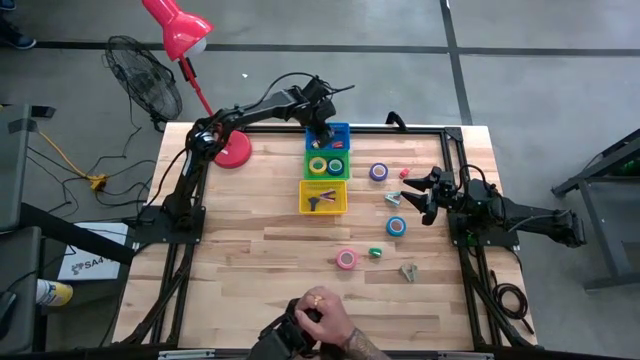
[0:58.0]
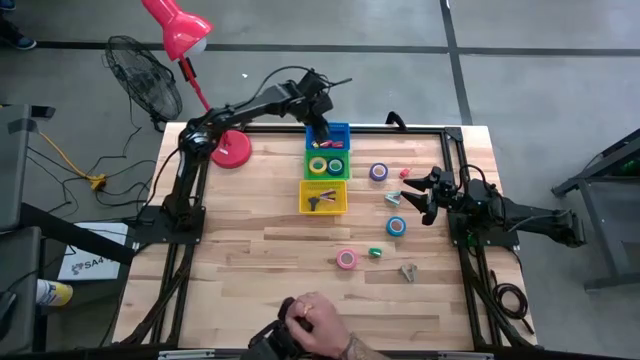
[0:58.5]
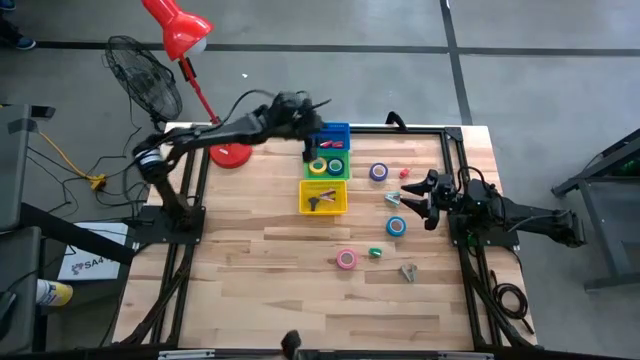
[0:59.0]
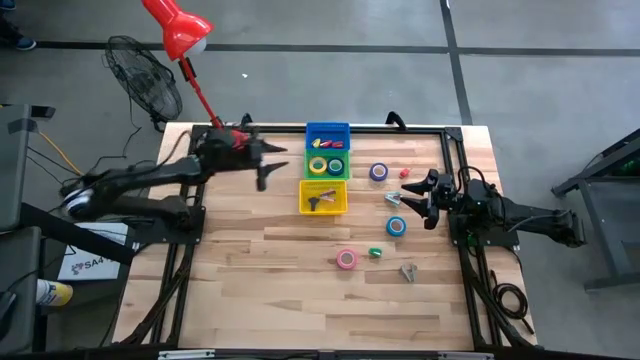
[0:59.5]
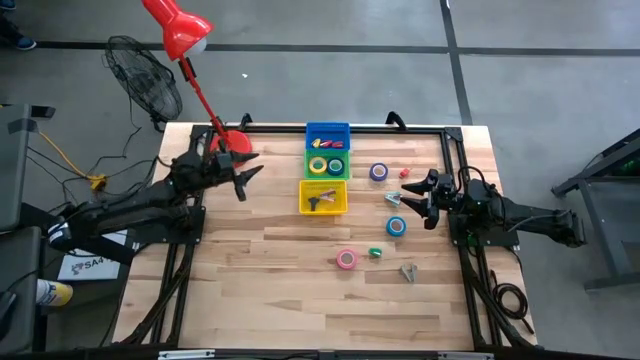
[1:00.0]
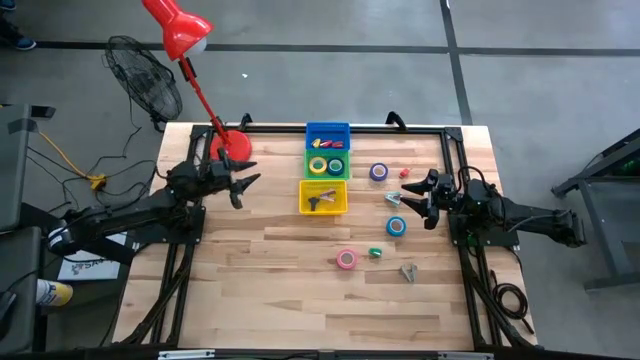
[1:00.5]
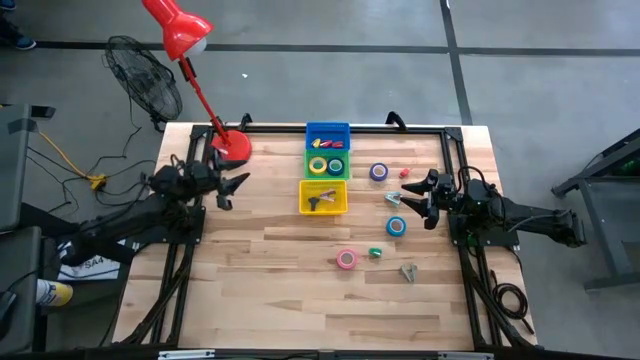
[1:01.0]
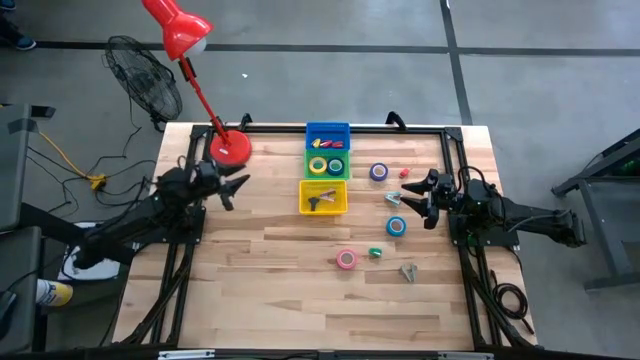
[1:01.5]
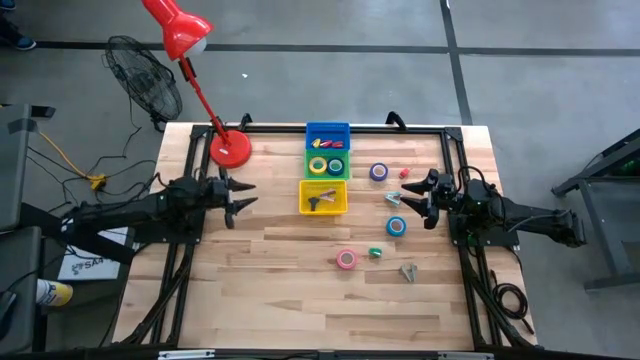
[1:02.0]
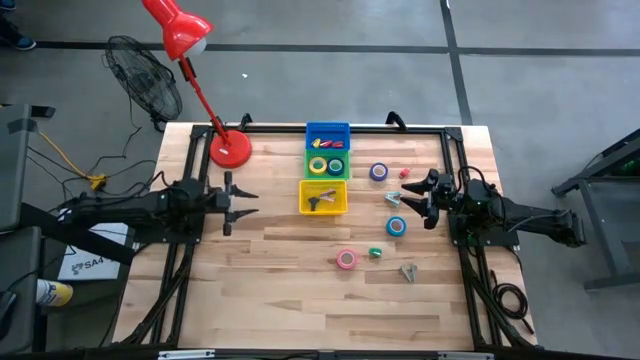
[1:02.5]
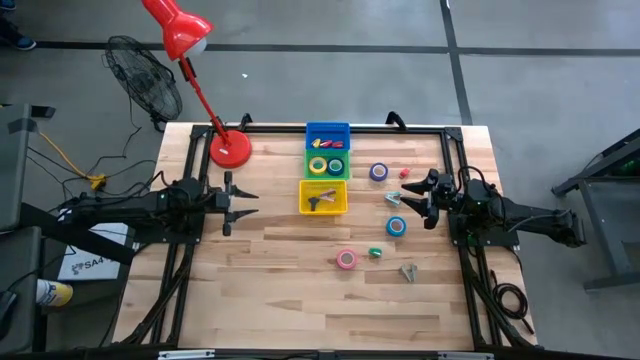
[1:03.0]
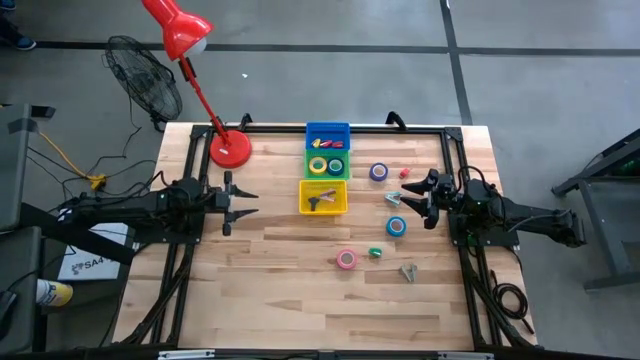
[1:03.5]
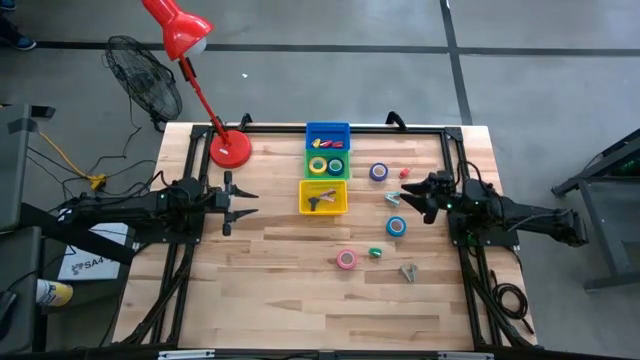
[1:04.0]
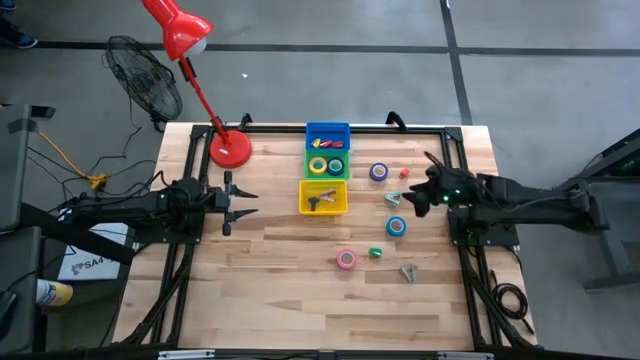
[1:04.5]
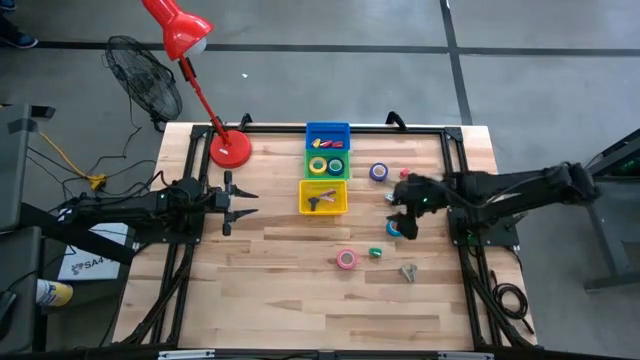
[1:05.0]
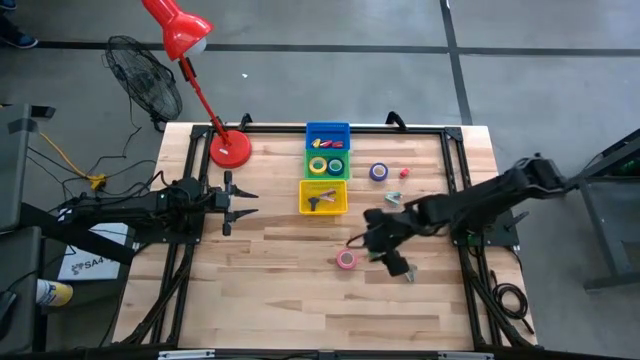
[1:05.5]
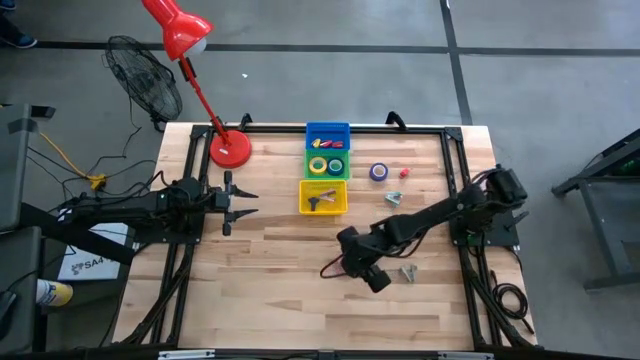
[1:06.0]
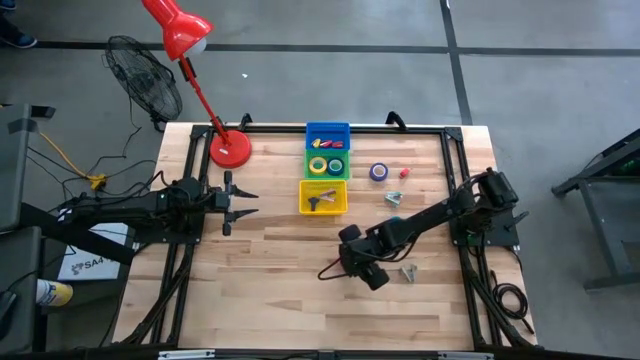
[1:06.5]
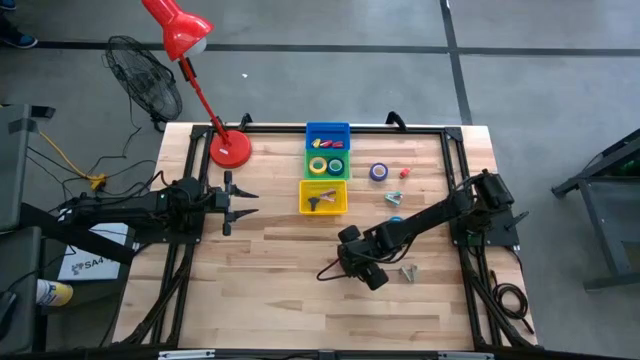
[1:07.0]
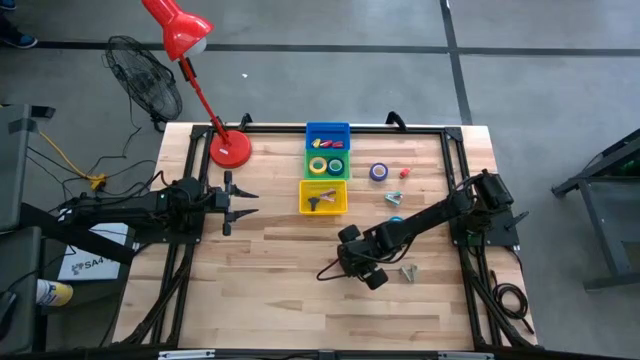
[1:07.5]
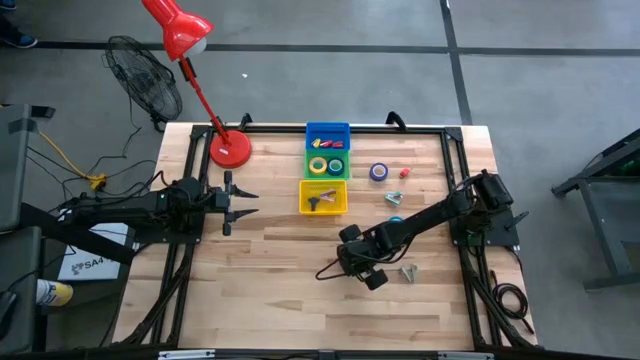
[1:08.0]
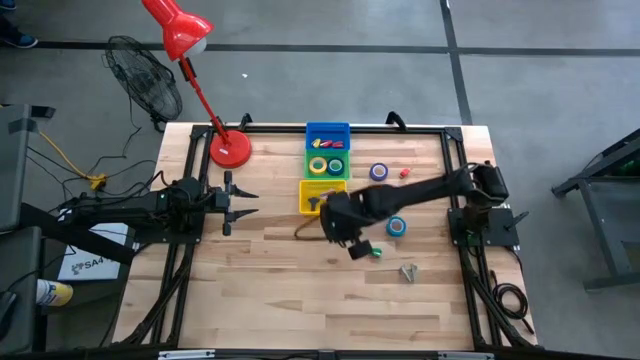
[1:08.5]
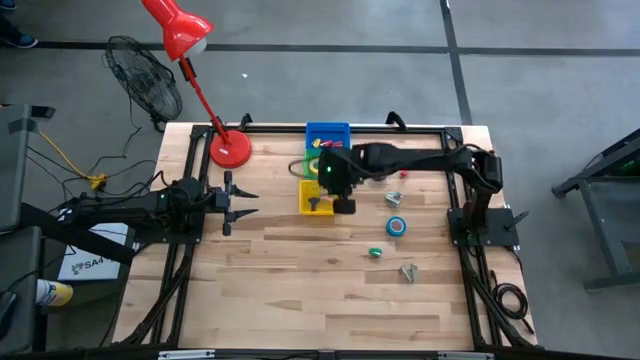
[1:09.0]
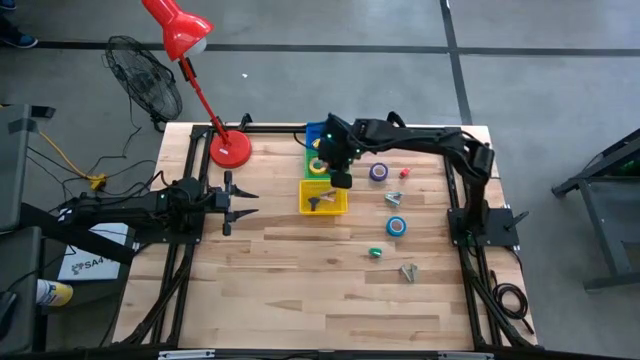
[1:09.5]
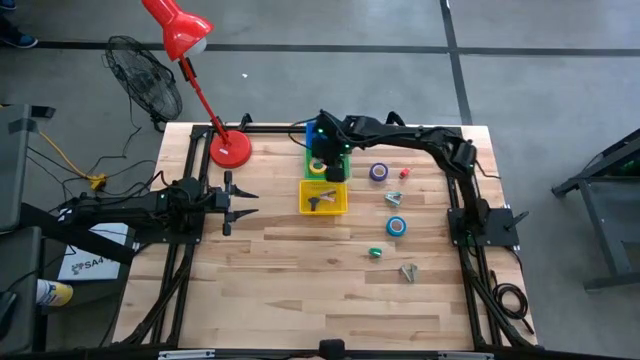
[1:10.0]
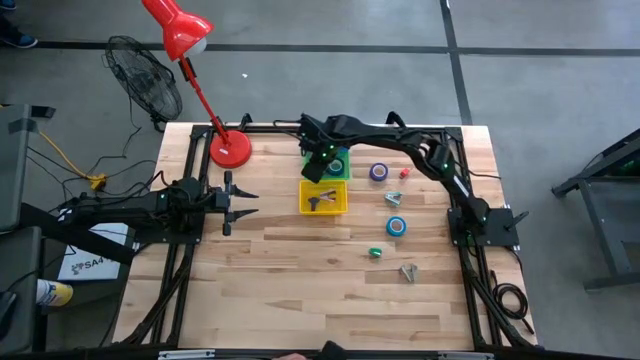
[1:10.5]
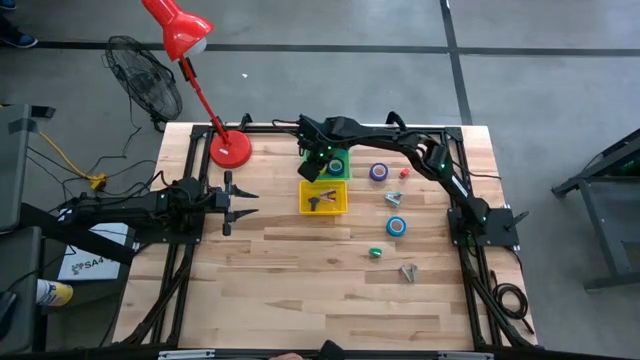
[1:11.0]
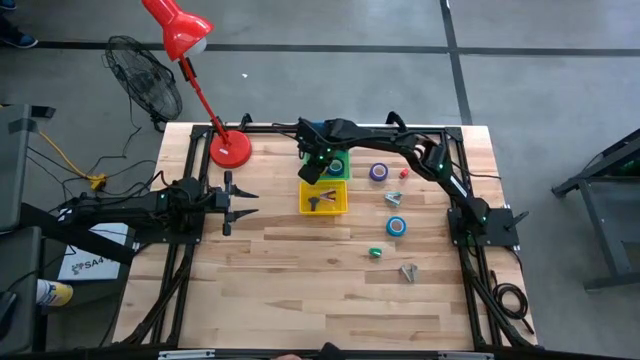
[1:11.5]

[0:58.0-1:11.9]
Task: Pick and place Stapler, Stapler remover, tape
Put the pink tape into the green bin

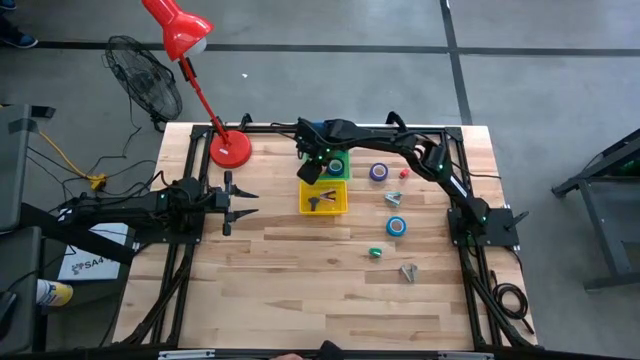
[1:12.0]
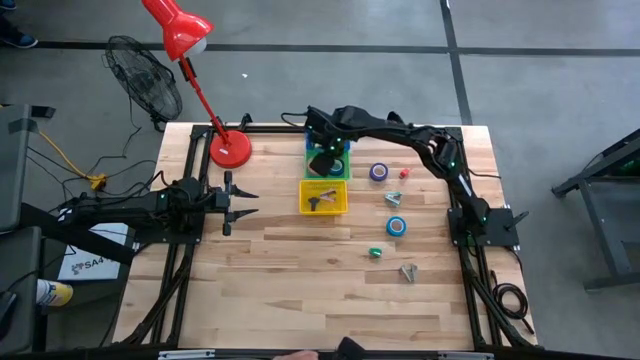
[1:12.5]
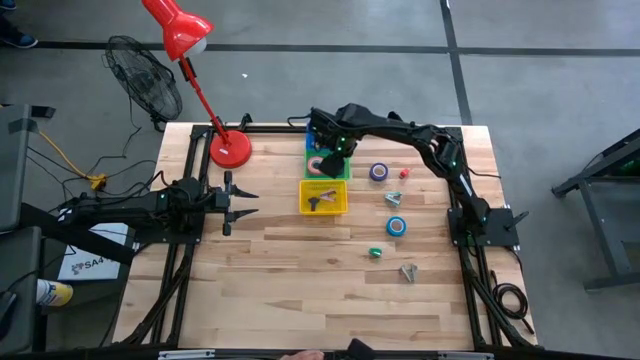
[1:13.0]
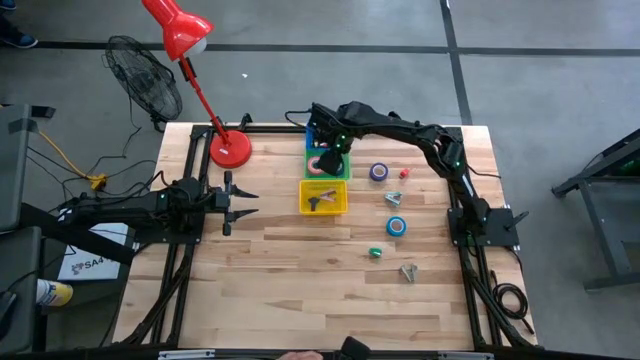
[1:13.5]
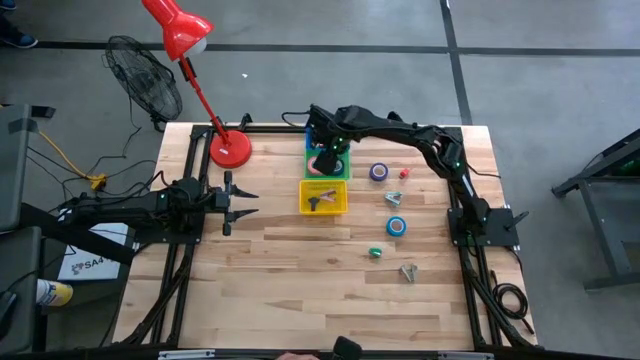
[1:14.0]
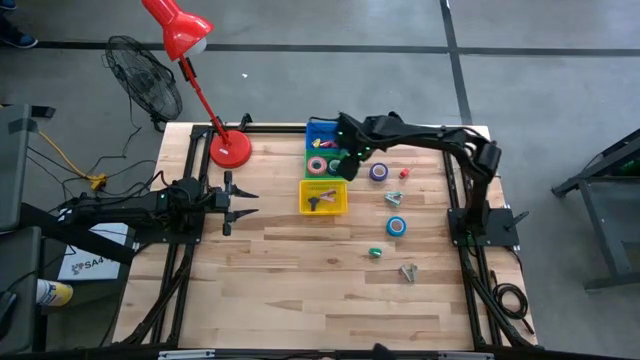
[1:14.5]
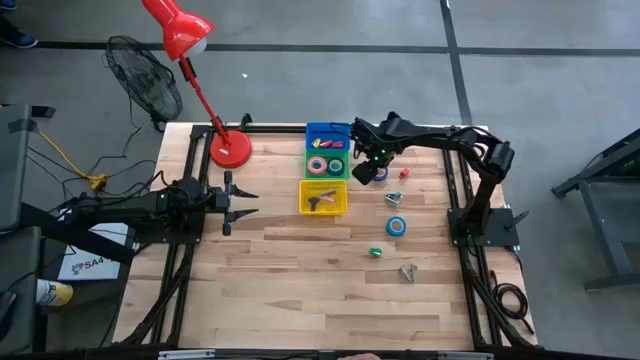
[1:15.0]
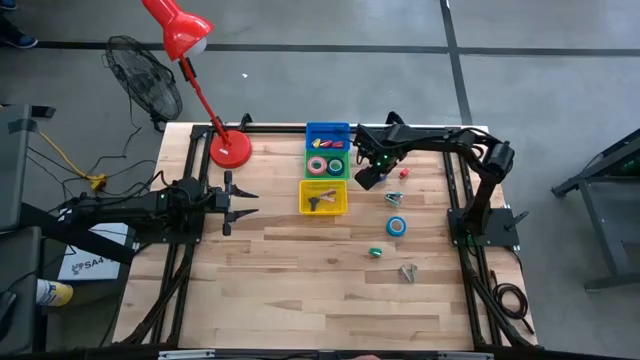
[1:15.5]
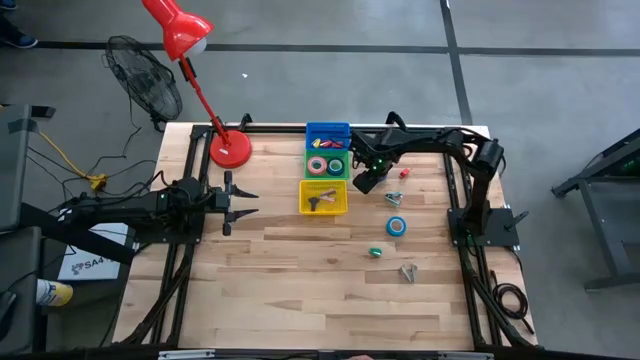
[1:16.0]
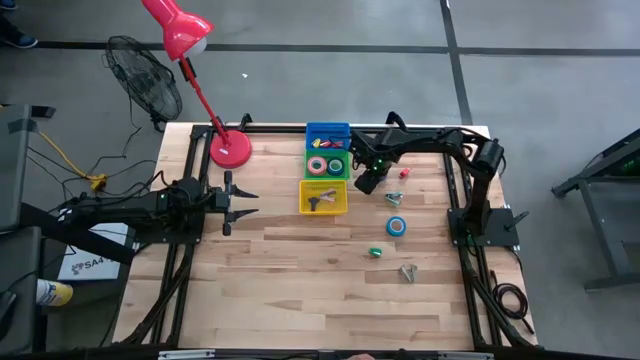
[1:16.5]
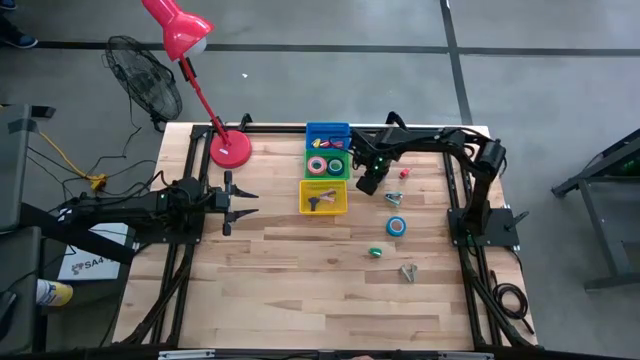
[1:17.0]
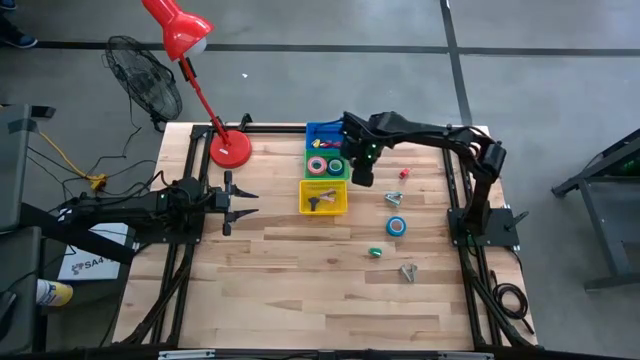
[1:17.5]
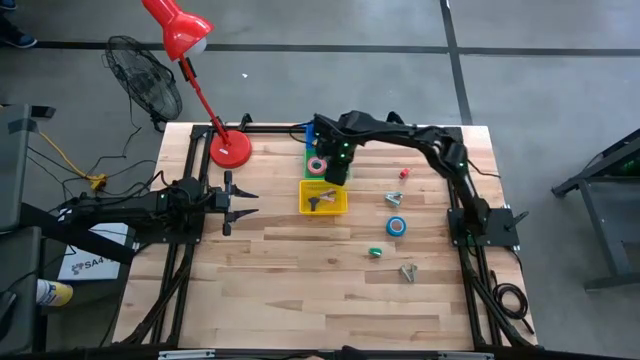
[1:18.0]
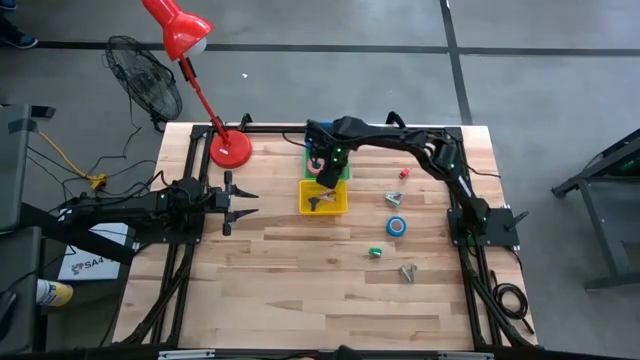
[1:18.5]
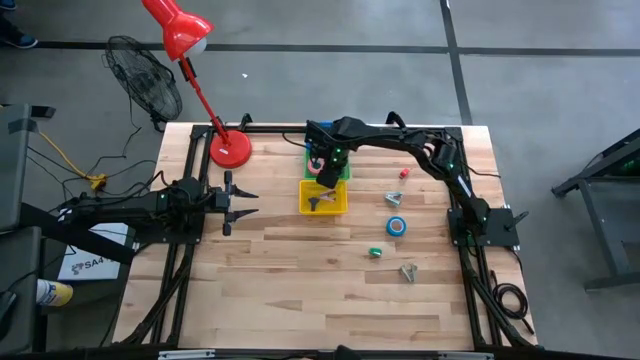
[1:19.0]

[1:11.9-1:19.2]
Put the blue tape into the green bin
